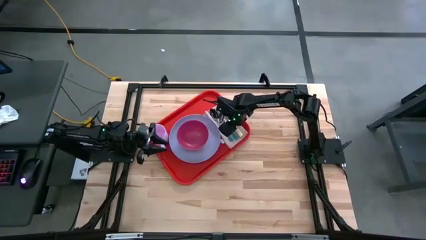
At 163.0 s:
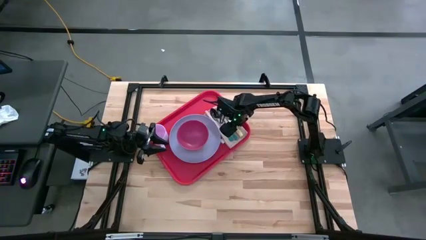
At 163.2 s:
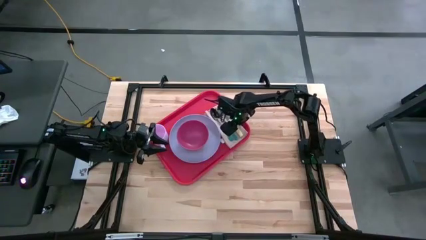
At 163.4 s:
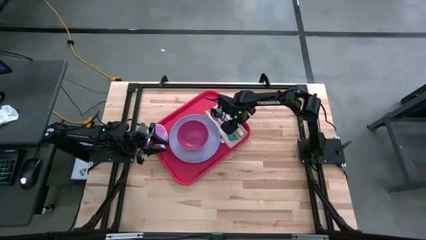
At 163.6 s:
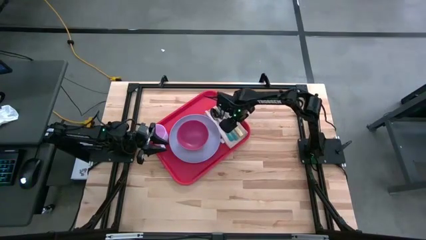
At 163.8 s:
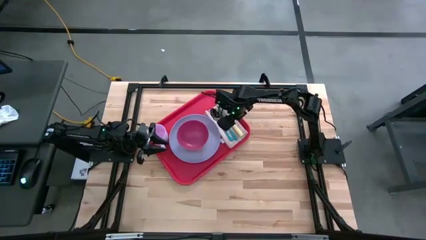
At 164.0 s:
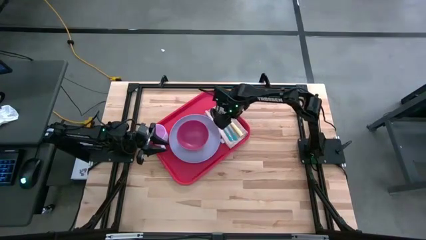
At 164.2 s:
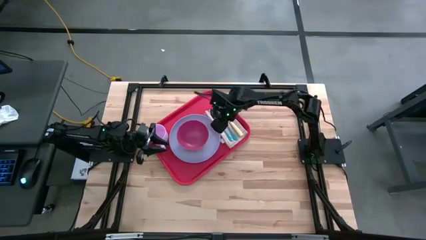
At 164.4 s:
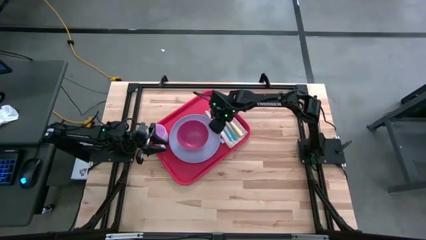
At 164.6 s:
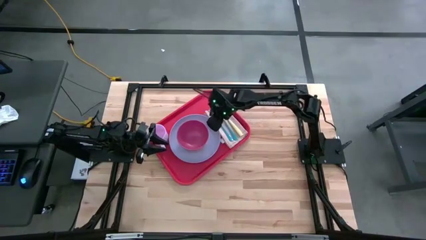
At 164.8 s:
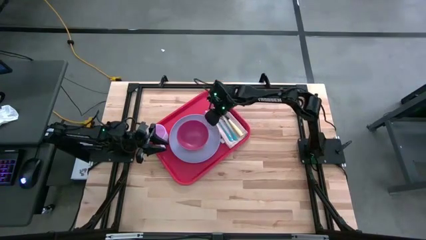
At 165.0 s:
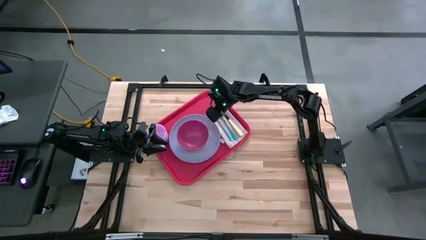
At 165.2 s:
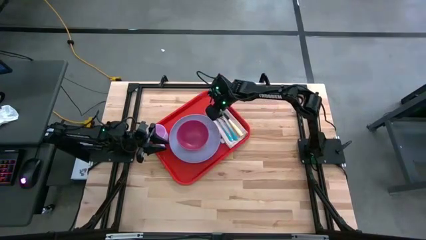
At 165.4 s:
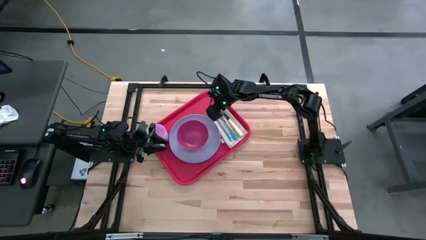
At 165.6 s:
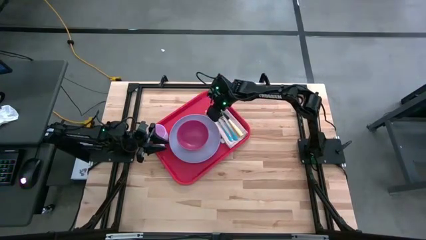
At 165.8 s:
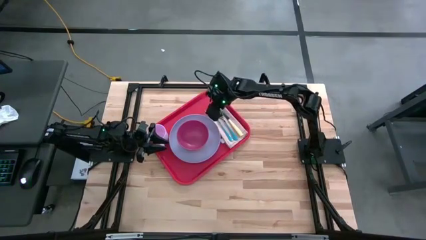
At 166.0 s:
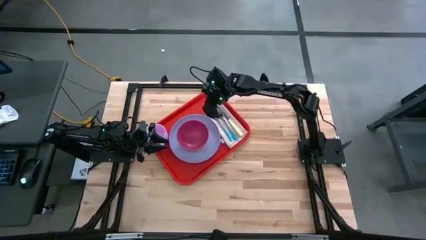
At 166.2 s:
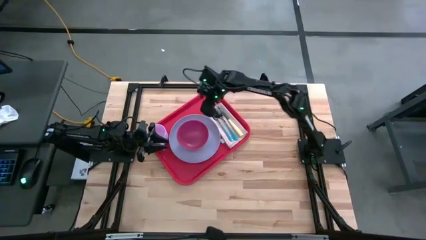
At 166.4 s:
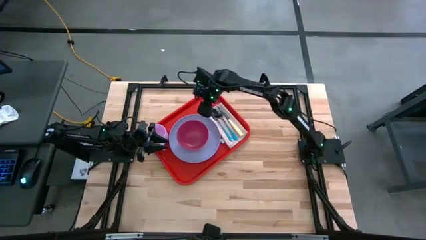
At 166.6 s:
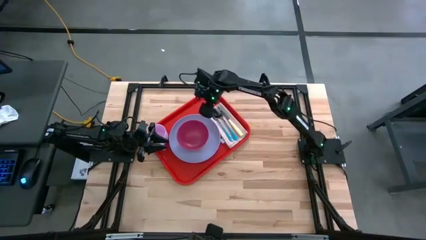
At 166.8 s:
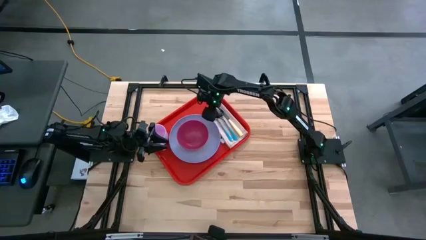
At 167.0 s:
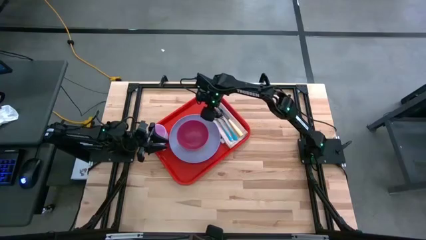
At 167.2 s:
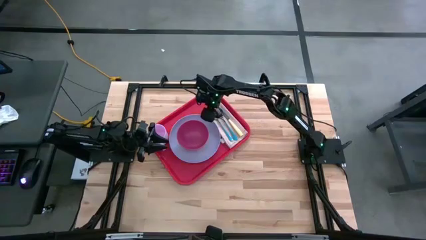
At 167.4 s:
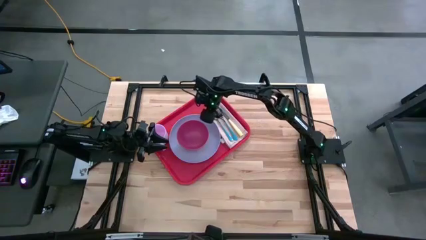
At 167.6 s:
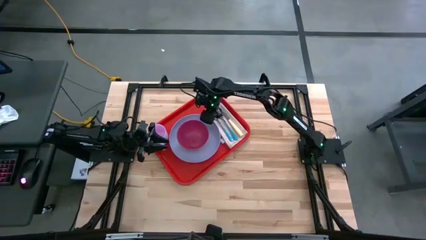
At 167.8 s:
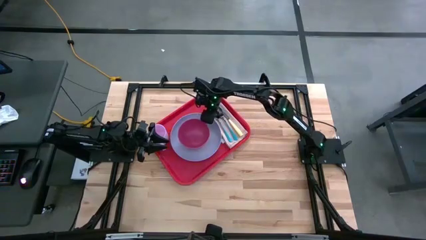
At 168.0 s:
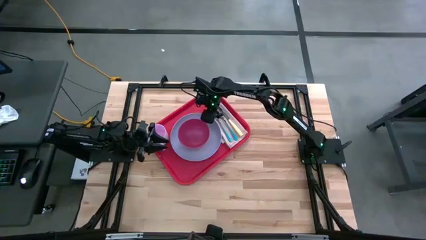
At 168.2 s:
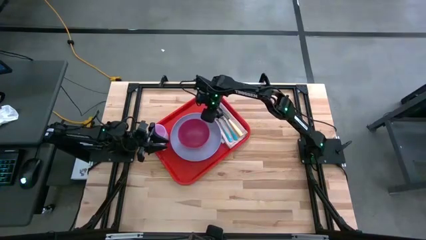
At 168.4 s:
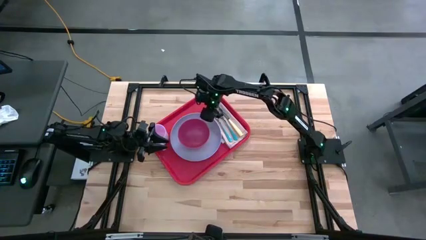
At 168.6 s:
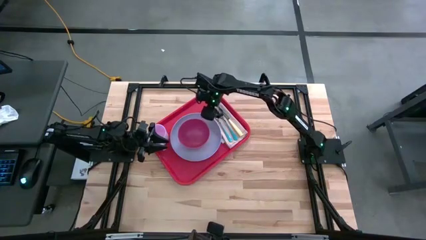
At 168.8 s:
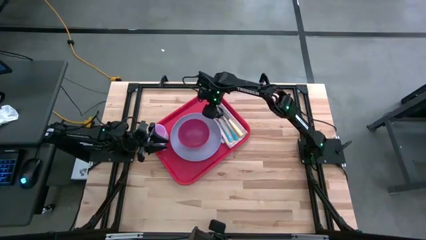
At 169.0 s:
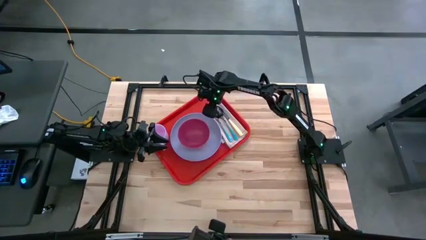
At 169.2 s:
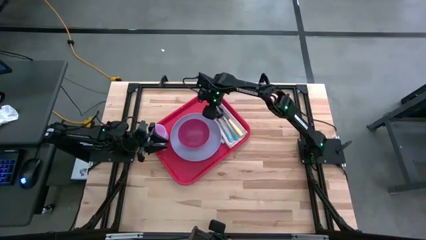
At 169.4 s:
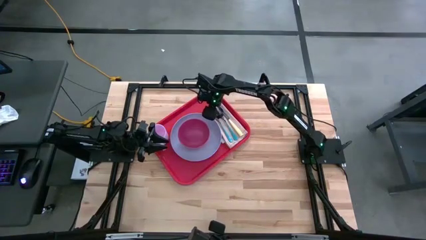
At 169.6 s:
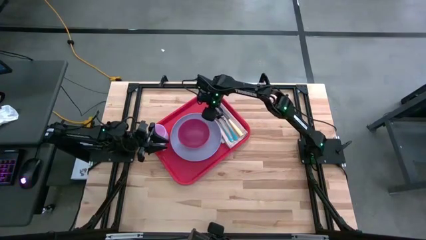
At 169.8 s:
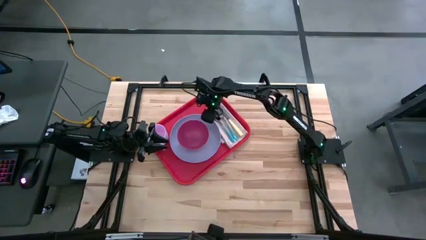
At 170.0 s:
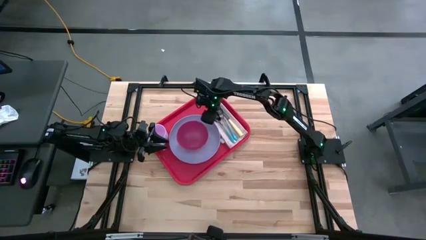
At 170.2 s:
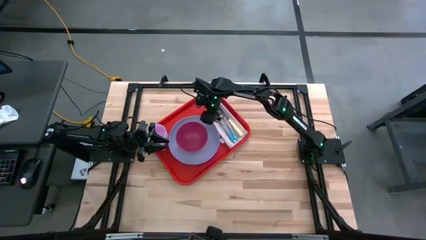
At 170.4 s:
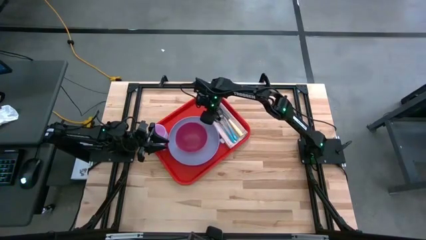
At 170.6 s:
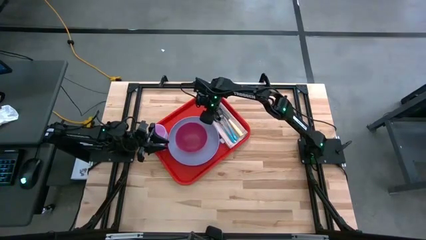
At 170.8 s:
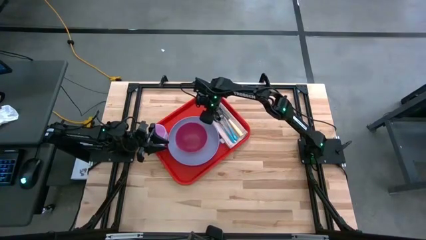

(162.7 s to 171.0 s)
Task: Set up tray
Adjust the white plate on the red serving tray

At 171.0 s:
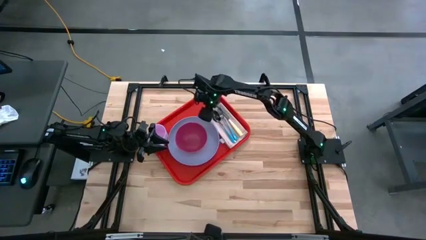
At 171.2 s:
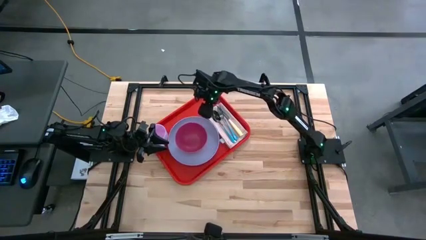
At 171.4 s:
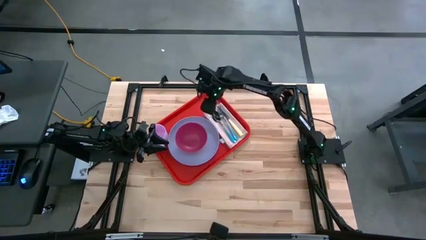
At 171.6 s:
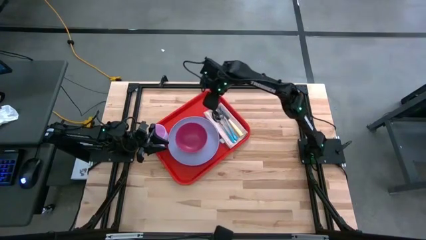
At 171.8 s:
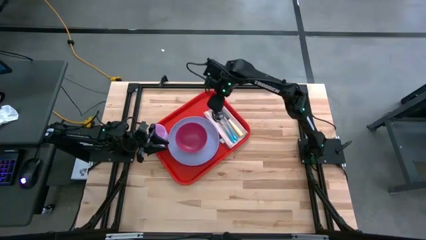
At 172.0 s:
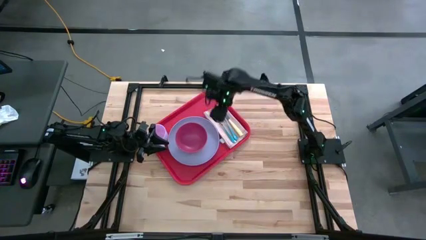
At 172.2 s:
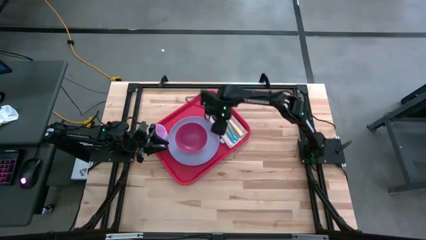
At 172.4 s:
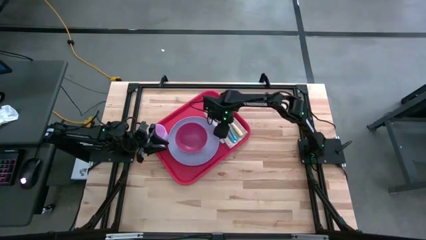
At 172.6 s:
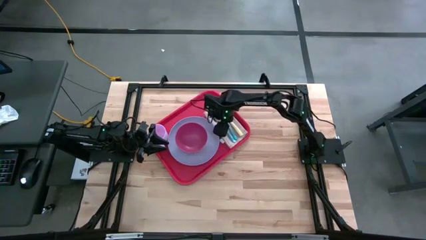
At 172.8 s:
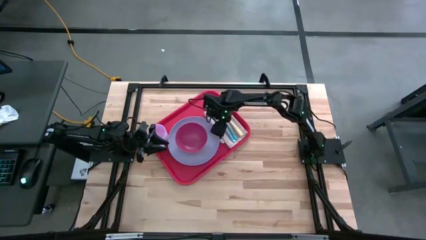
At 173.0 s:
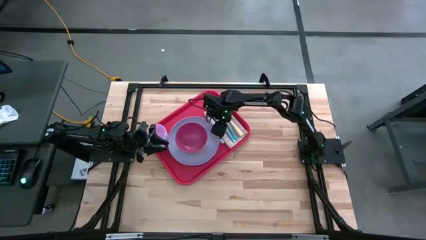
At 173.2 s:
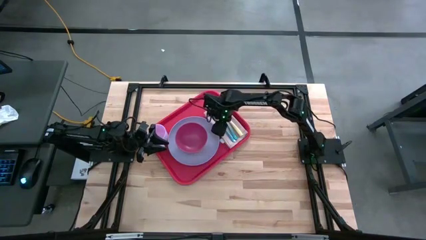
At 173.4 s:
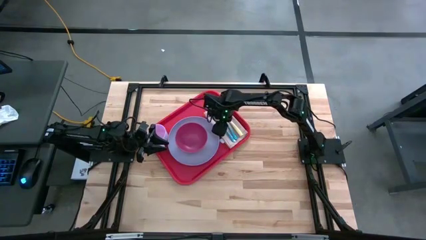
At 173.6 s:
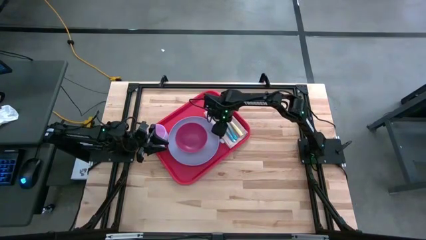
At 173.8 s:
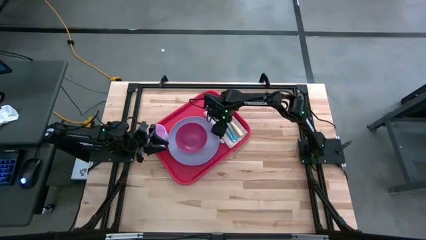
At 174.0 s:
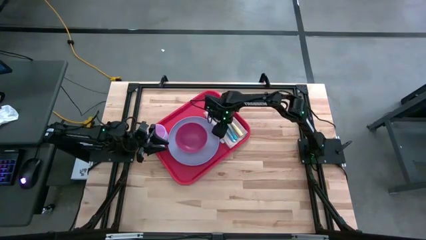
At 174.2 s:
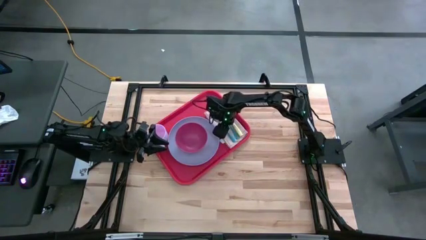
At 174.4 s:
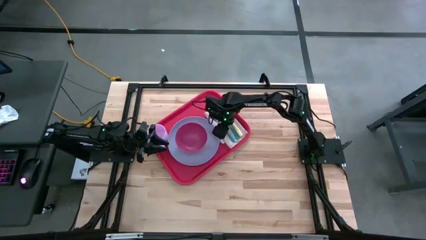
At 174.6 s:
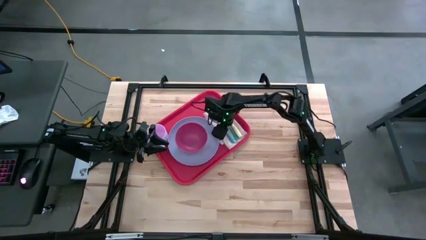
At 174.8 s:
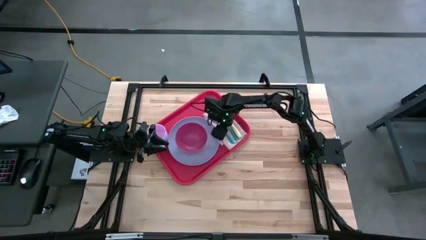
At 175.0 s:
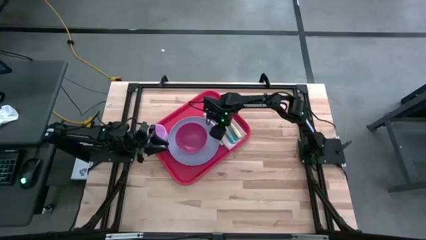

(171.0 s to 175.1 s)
Adjust the brown table napkin on the red serving tray

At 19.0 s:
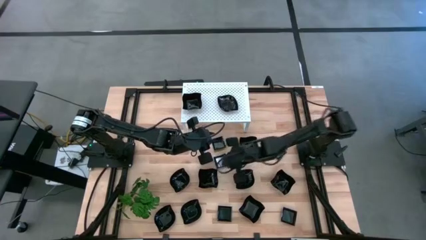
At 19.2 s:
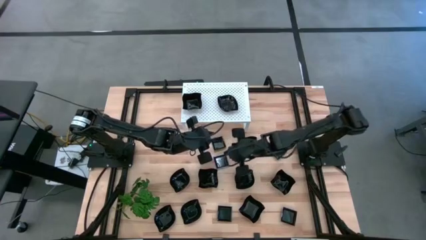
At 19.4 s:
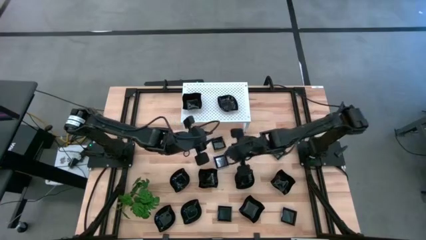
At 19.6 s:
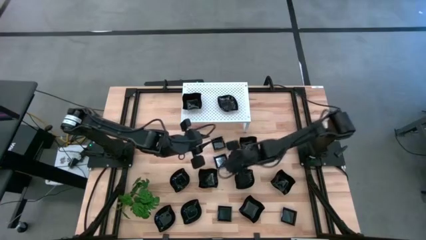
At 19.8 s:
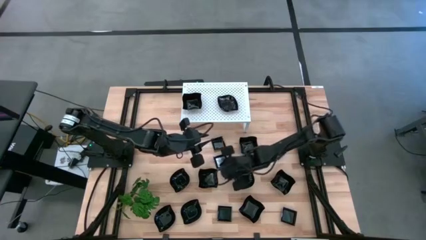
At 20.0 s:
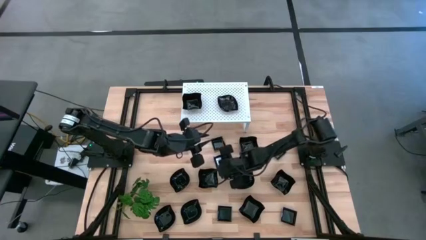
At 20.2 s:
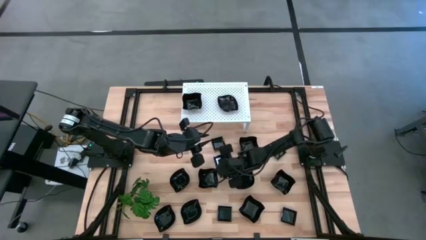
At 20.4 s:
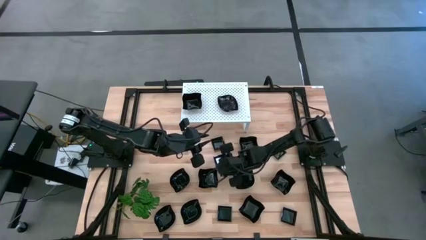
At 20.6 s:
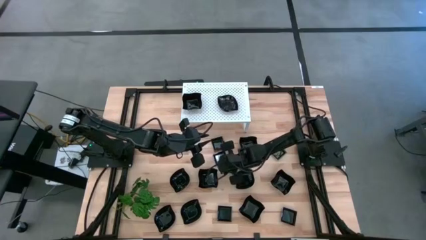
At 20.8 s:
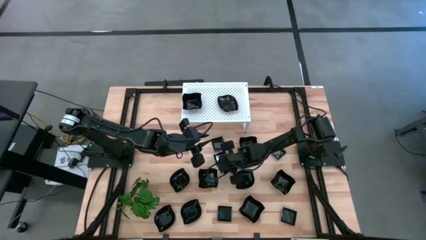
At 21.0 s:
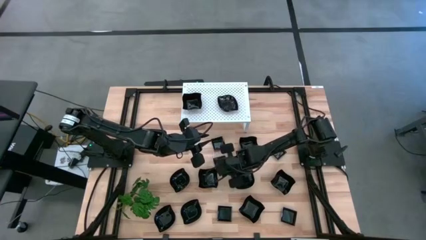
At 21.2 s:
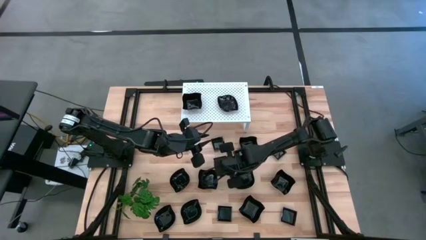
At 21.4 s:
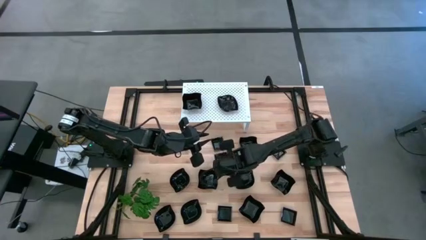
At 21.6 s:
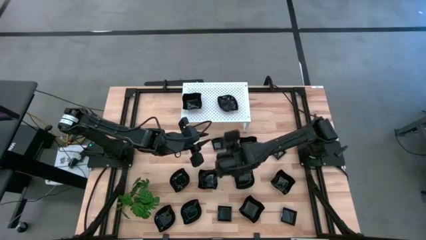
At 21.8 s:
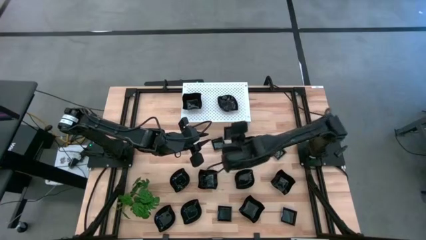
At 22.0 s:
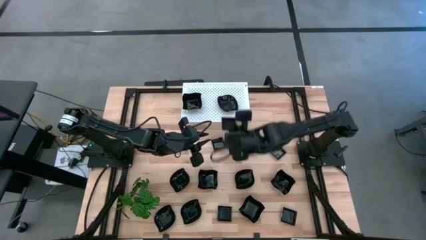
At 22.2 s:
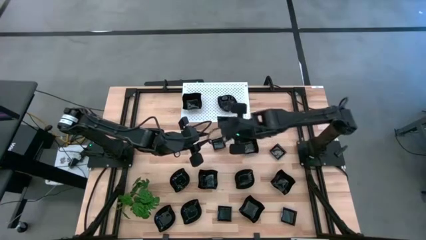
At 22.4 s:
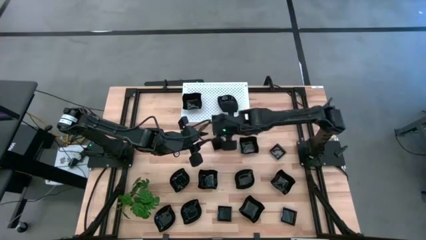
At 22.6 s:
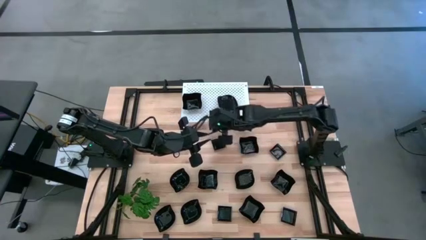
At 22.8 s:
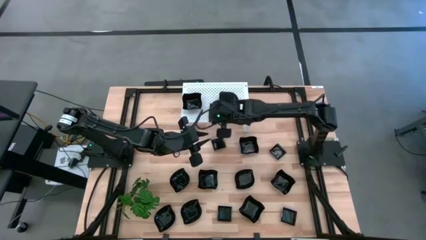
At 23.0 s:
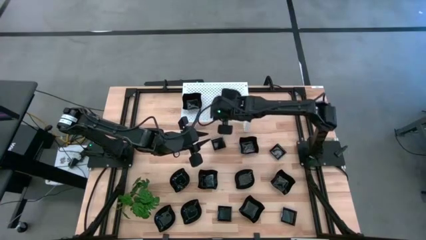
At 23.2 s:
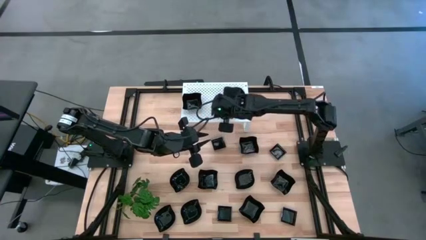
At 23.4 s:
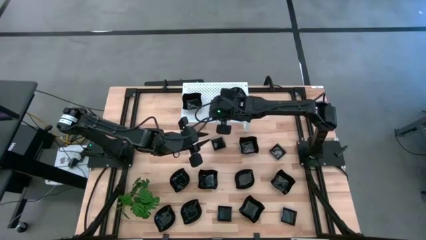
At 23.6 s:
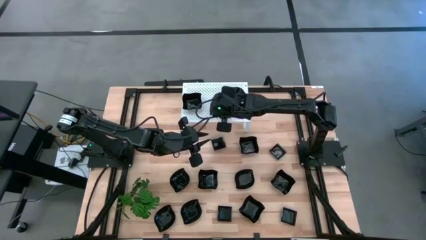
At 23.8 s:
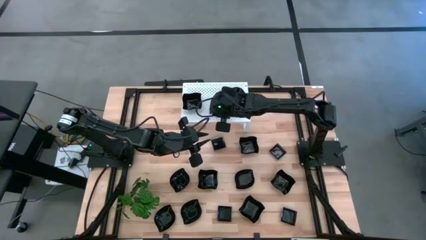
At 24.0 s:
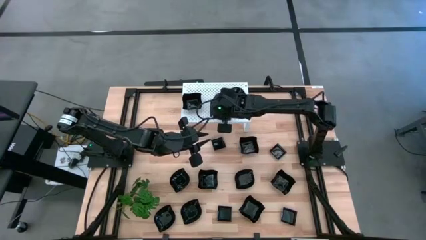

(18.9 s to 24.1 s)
Task: Pick & Place Mini shaped plates
Put the square plate on the shelf
